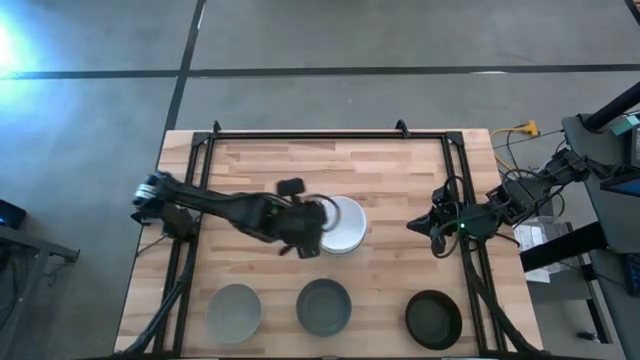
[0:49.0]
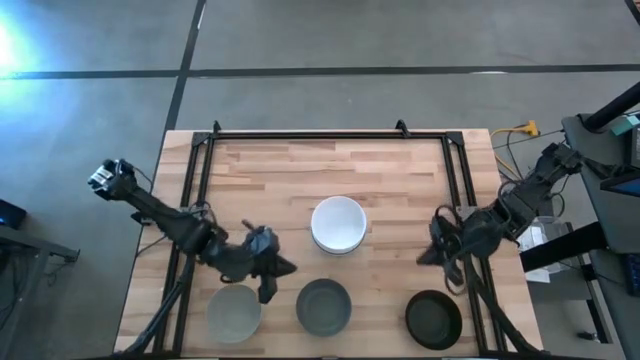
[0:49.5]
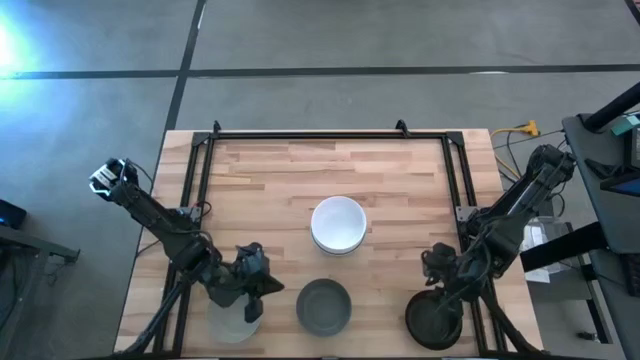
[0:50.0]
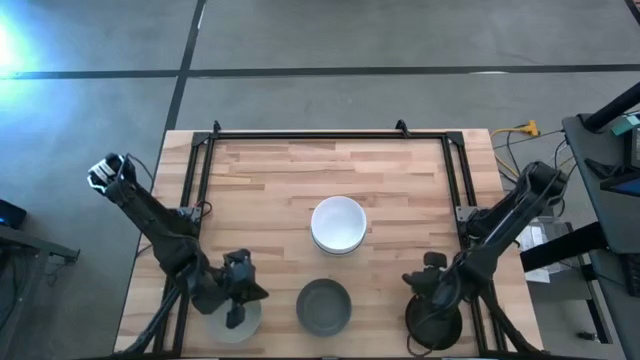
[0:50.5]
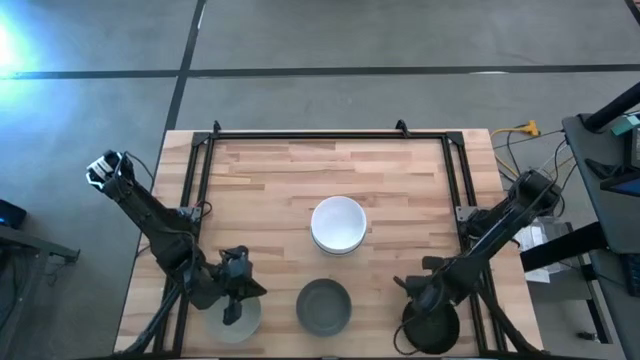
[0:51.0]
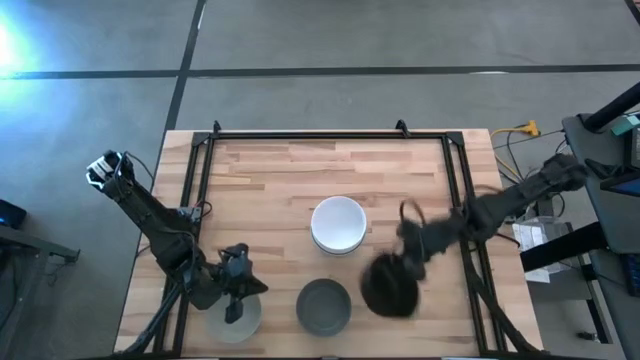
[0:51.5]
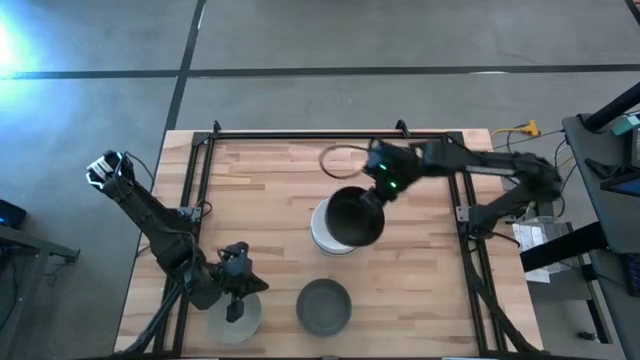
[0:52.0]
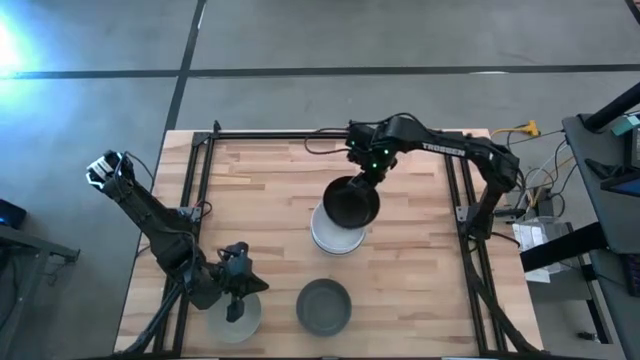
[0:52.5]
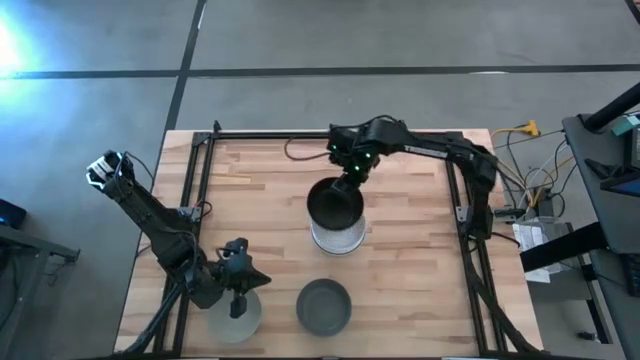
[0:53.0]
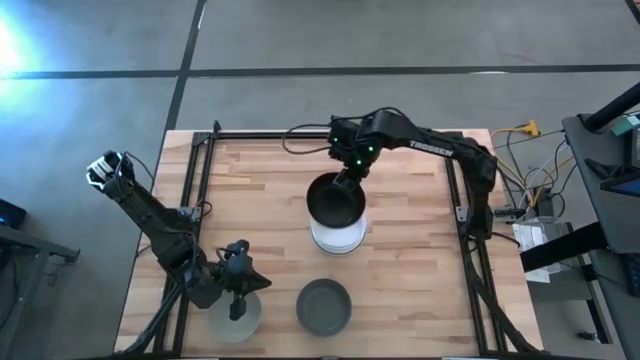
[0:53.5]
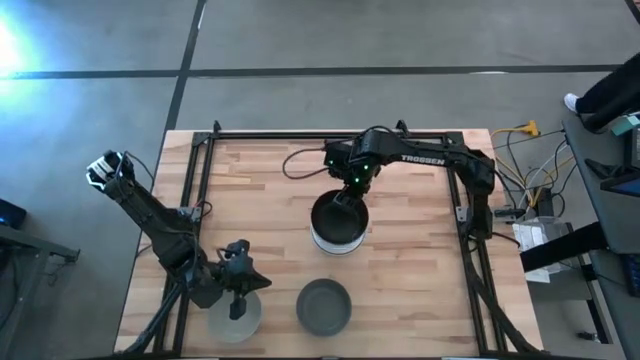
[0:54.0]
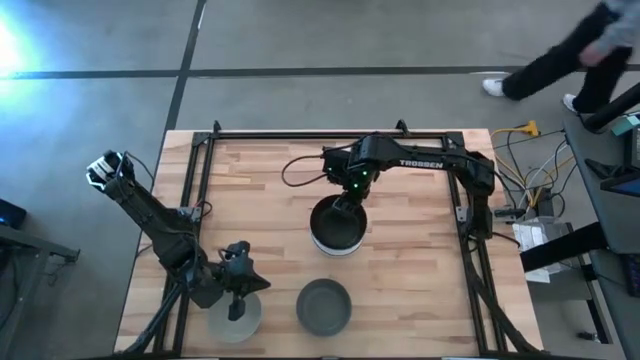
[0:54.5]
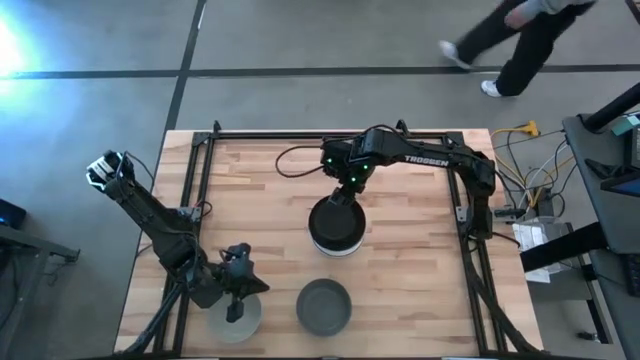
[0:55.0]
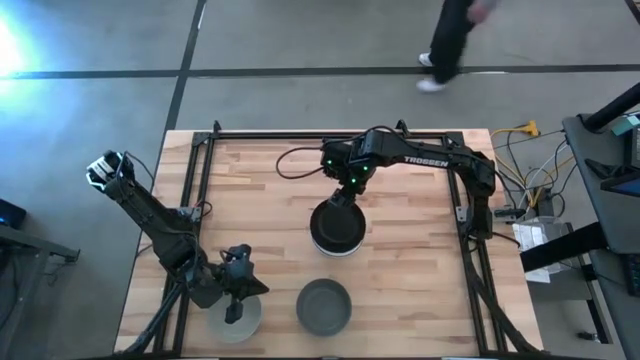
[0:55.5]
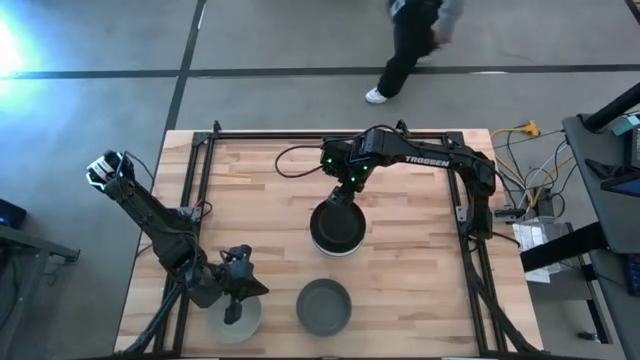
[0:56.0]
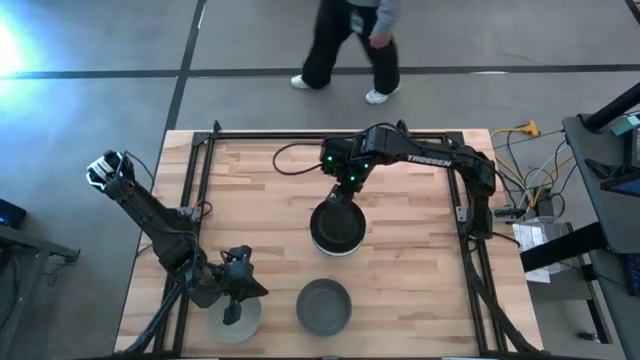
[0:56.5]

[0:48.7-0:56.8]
Task: Nest bowls inside each other
Stack the black bowl on top of the white bowl

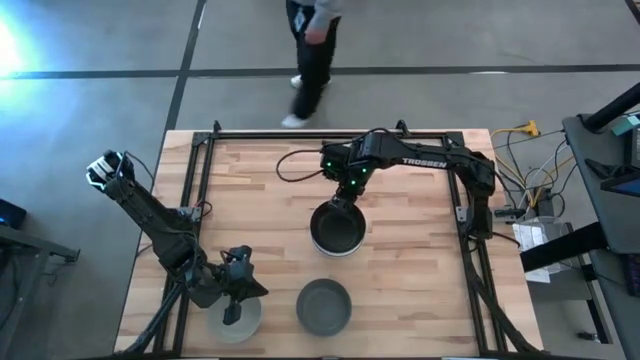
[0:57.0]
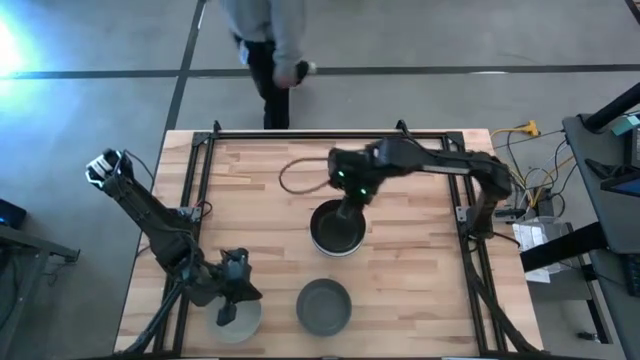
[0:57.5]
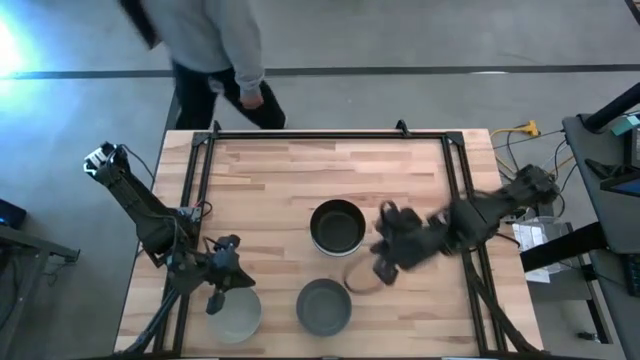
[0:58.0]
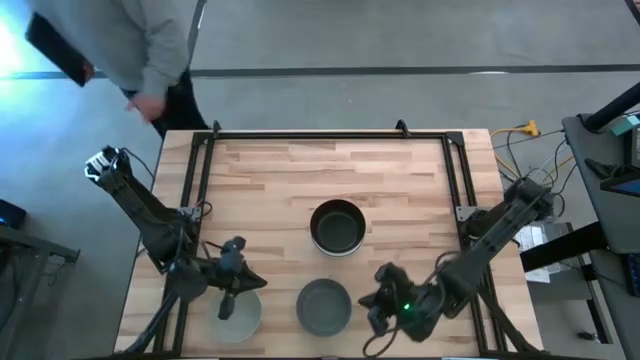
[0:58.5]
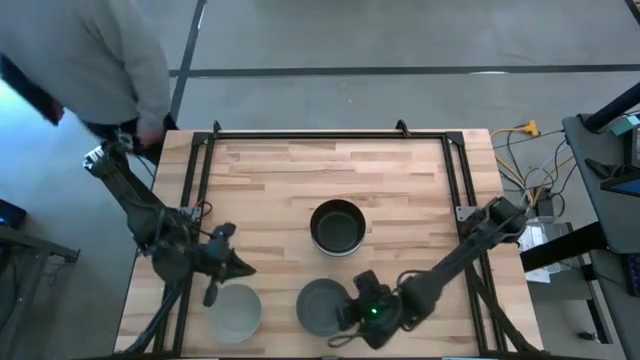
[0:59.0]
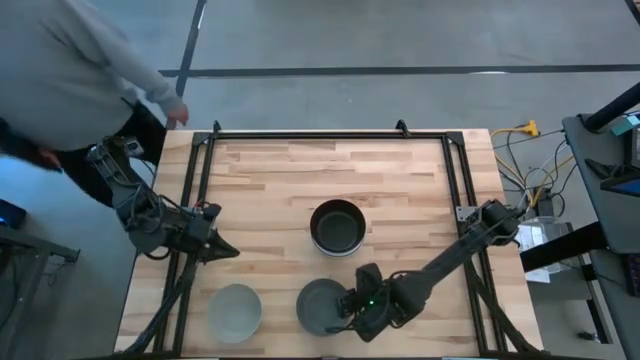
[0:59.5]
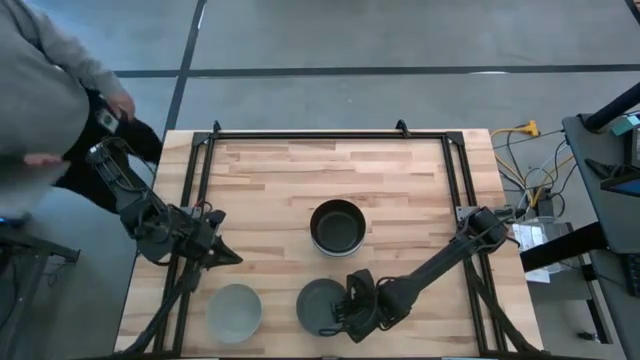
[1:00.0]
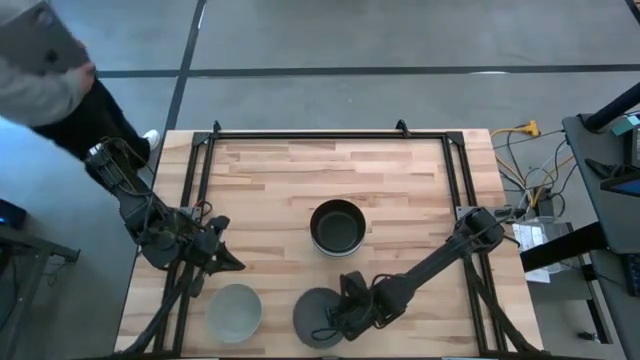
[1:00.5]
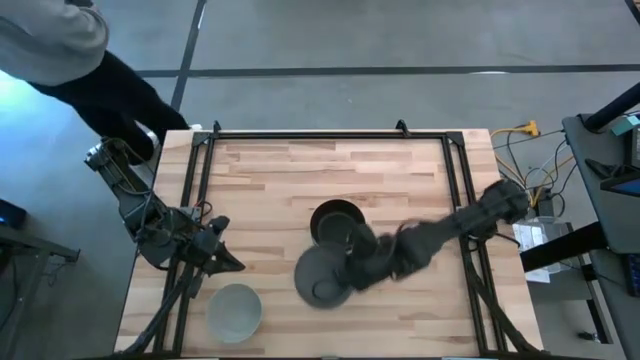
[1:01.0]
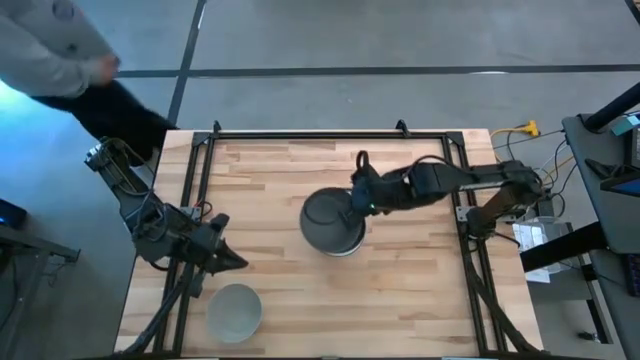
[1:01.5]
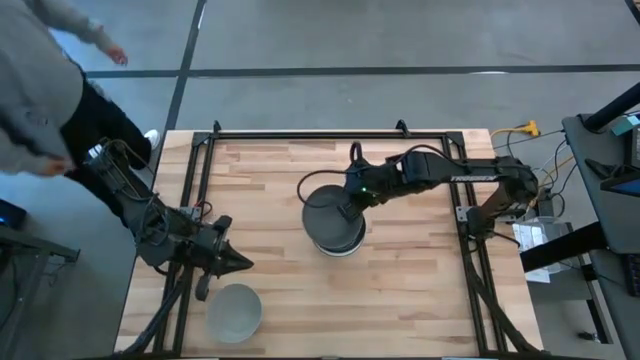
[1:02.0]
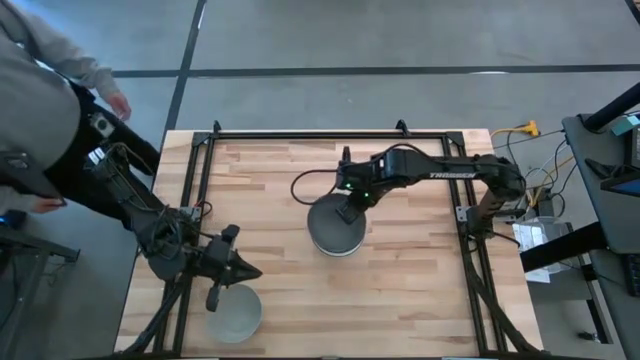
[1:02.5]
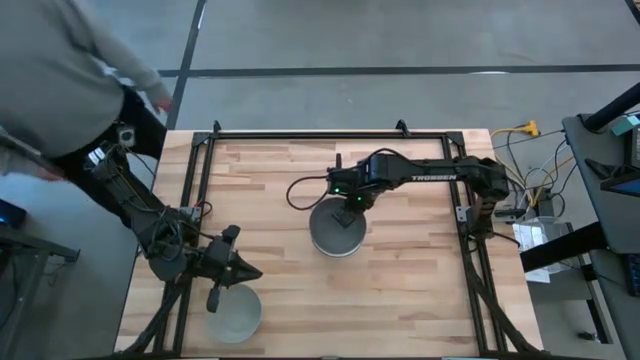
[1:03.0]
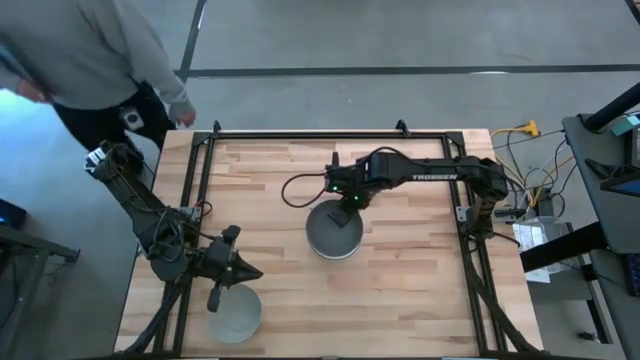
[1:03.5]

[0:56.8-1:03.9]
Stack the dark gray bowl on top of the black bowl

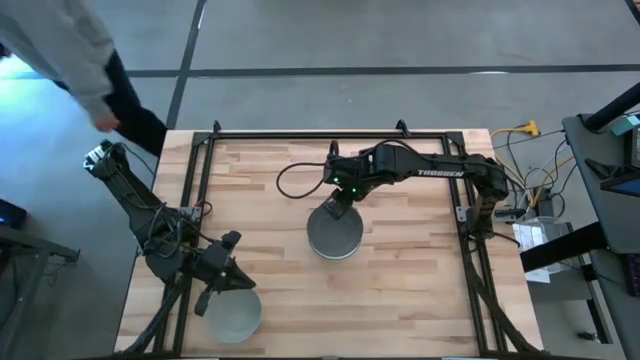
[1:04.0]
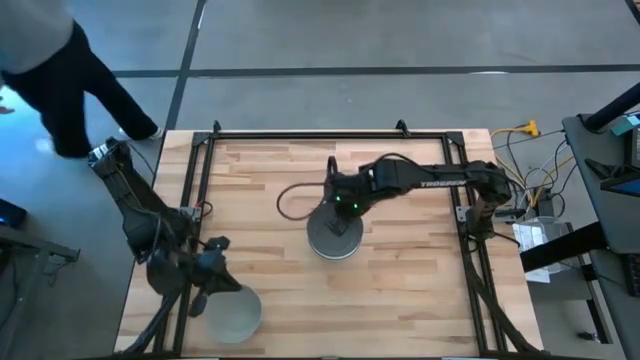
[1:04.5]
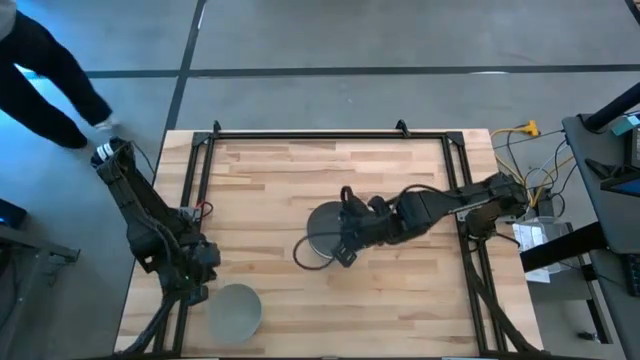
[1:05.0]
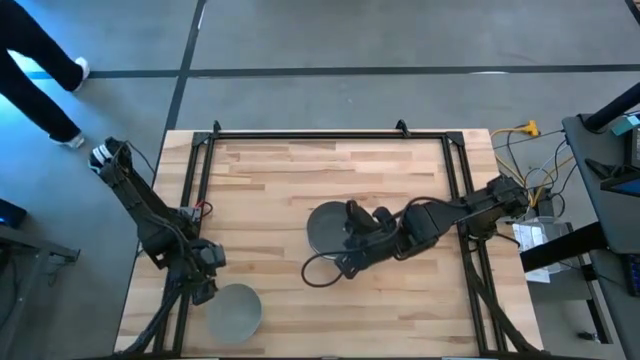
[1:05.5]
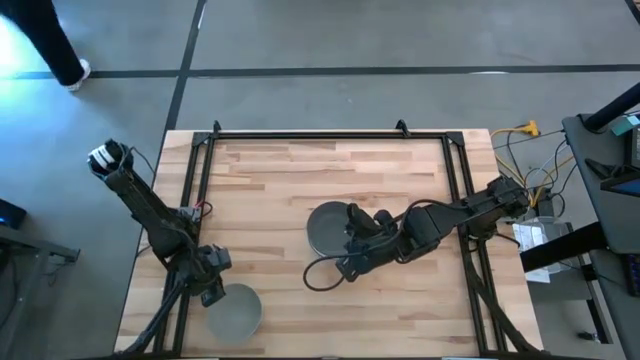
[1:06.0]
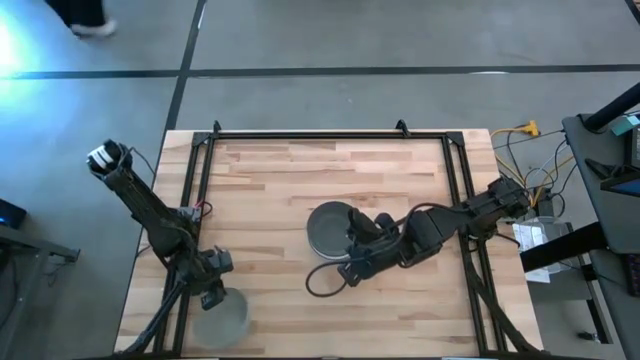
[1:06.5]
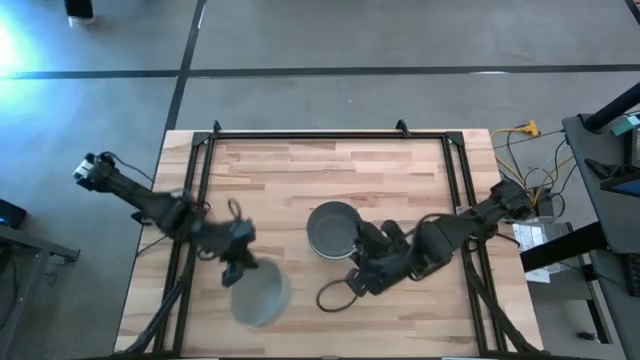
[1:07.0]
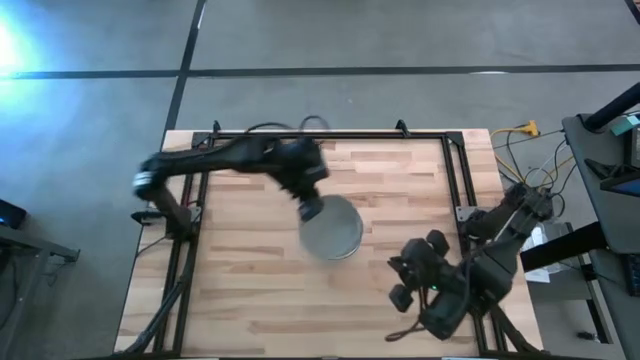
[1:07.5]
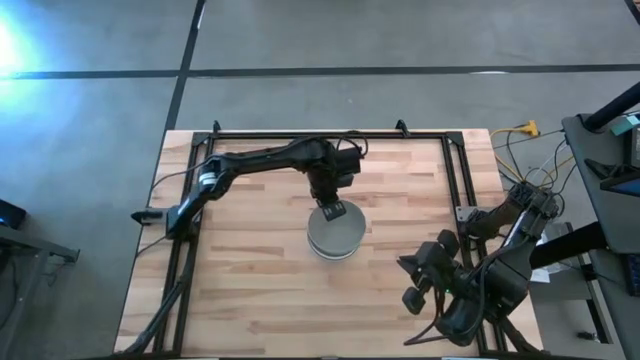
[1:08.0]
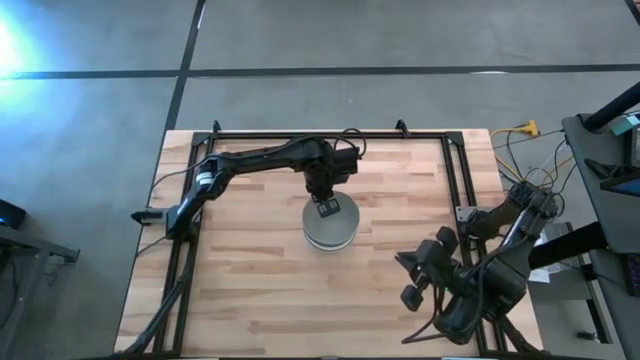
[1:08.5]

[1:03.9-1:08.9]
Stack the gray on top of the dark gray bowl
